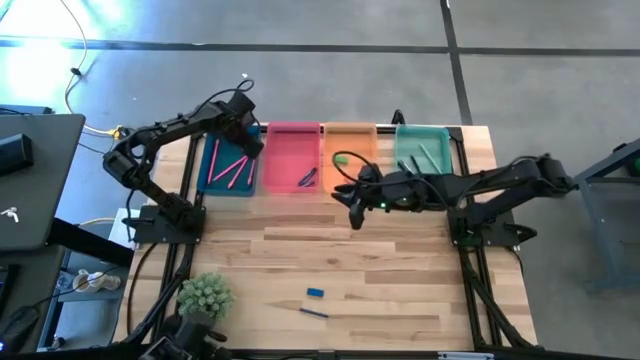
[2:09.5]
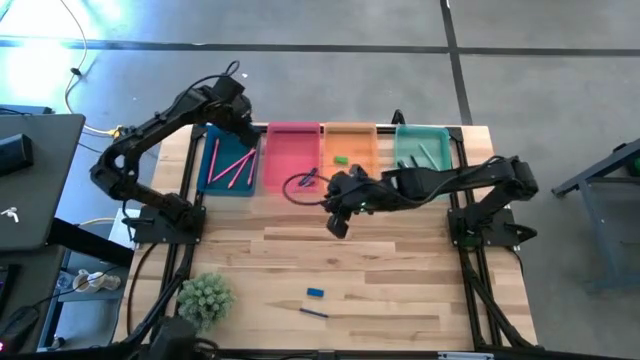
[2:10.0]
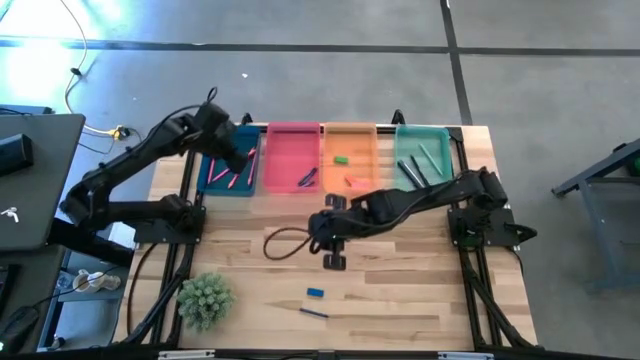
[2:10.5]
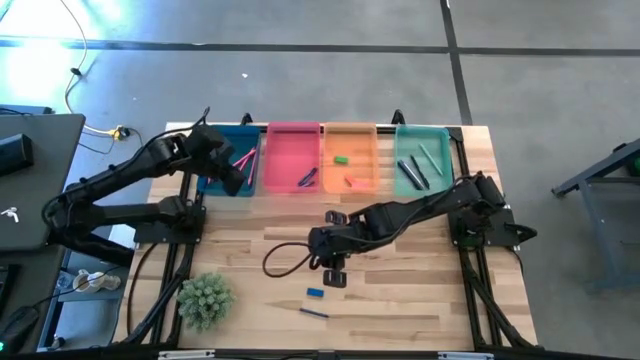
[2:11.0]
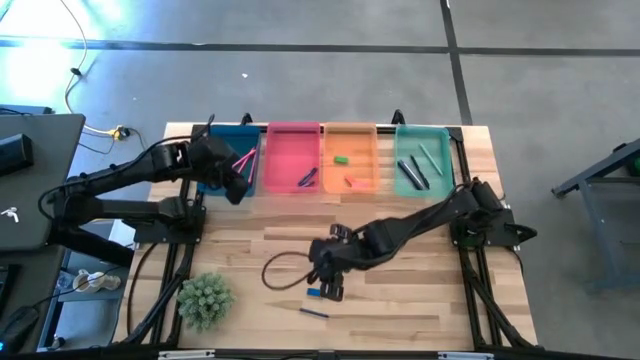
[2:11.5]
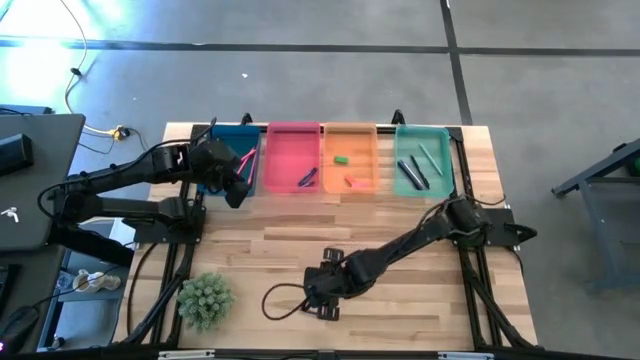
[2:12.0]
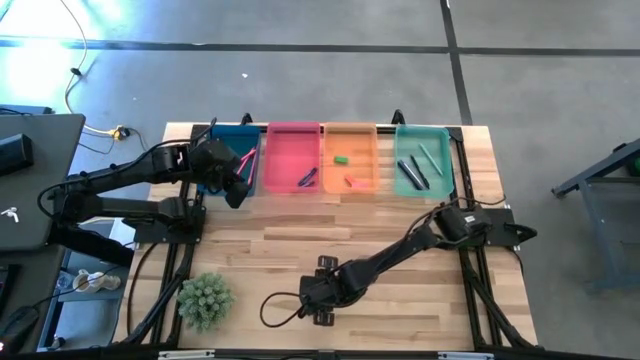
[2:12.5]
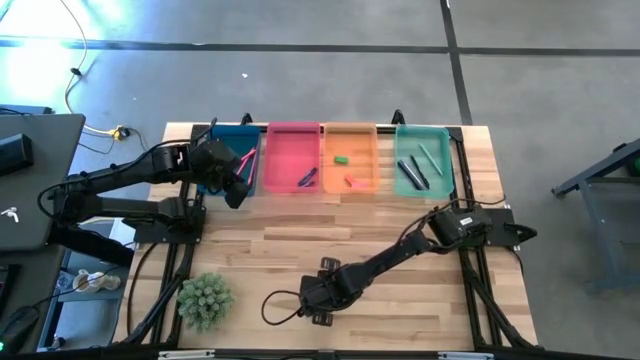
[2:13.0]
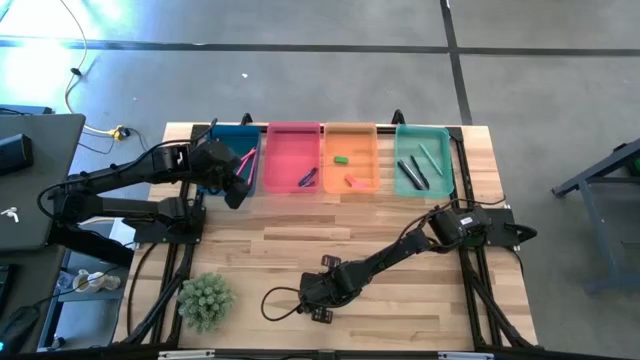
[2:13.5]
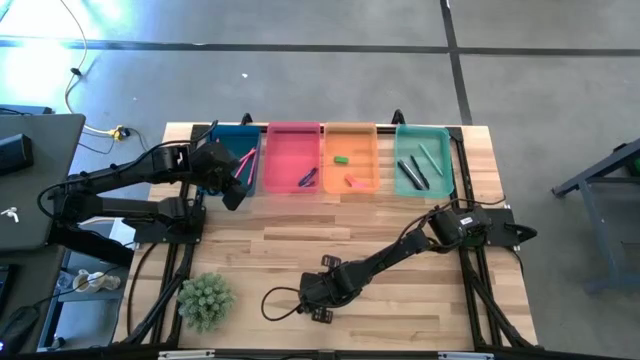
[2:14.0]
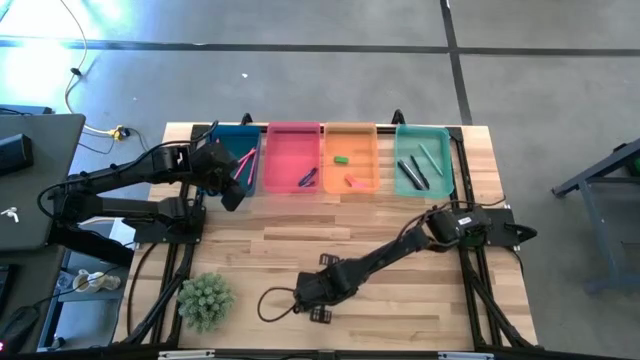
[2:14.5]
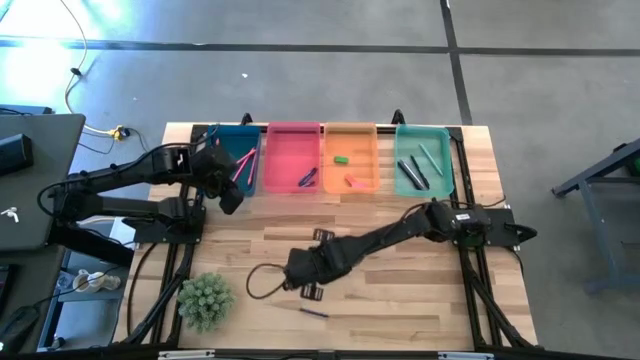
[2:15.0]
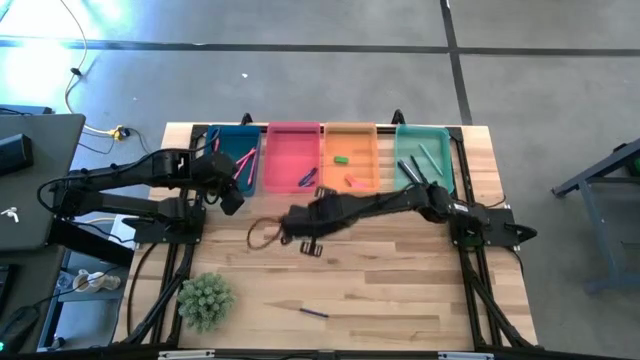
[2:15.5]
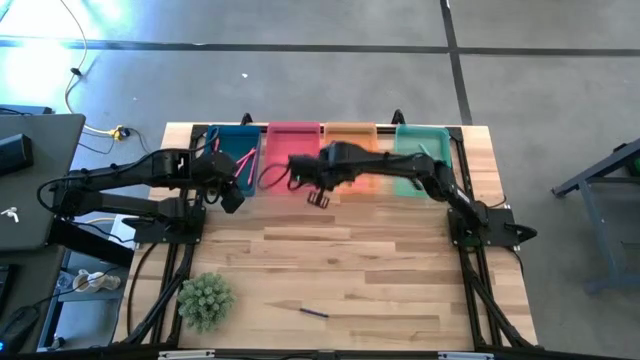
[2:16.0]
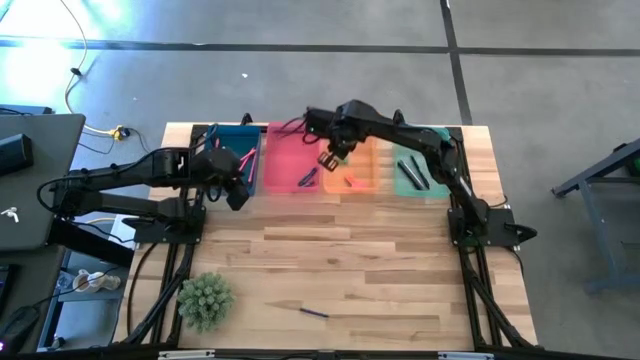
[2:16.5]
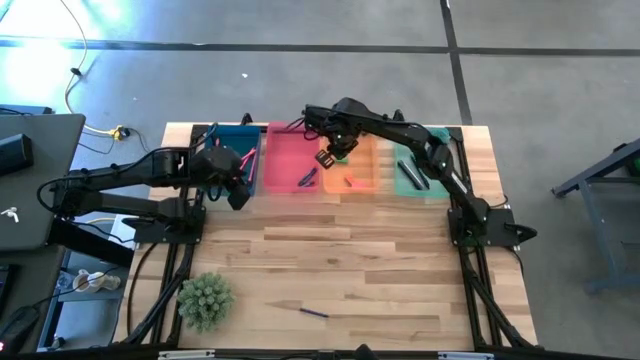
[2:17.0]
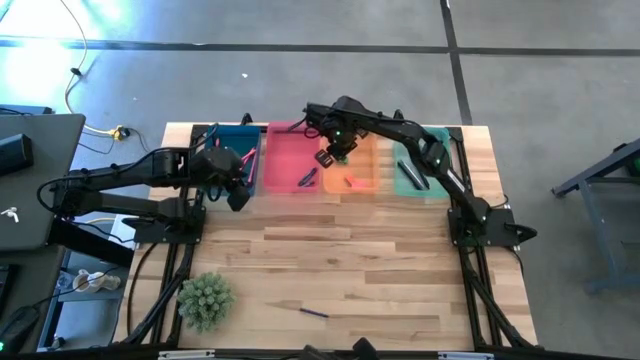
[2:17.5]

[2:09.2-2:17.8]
Task: Sort crayons/erasers/pens/pencils in bins
Put the blue eraser into the orange bin

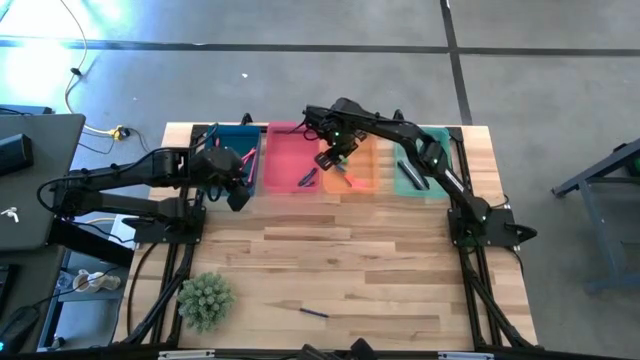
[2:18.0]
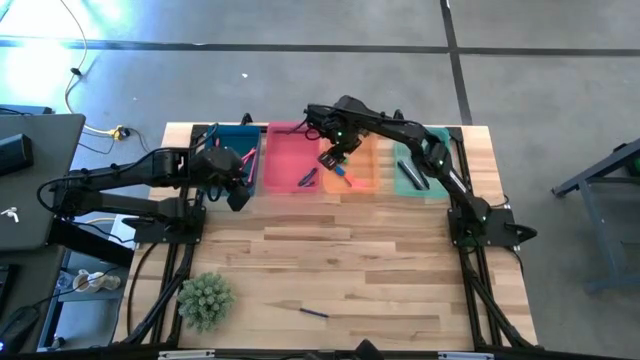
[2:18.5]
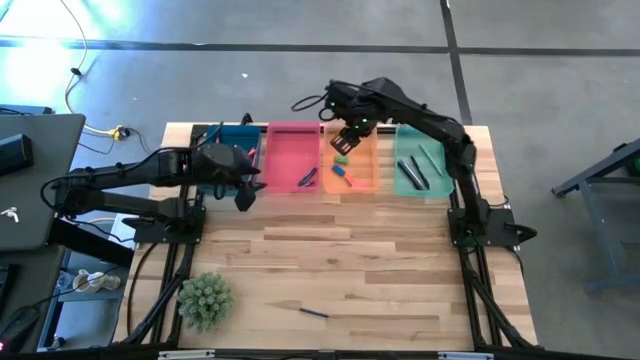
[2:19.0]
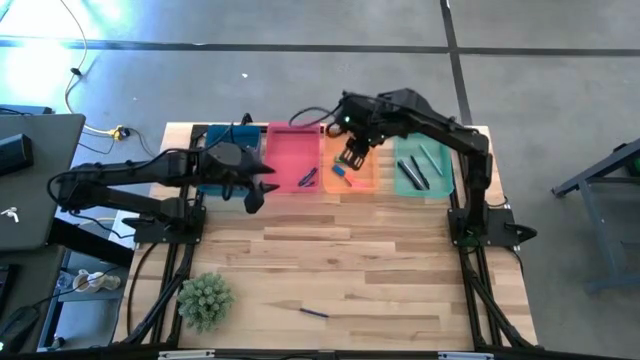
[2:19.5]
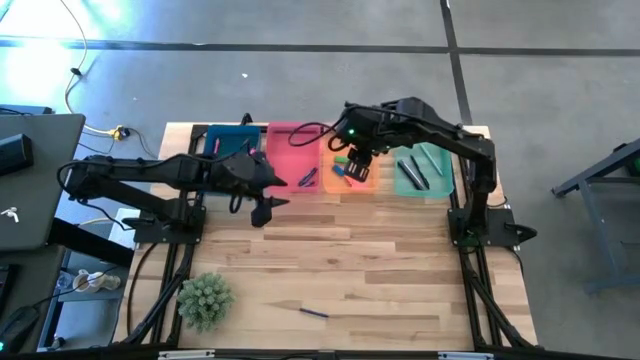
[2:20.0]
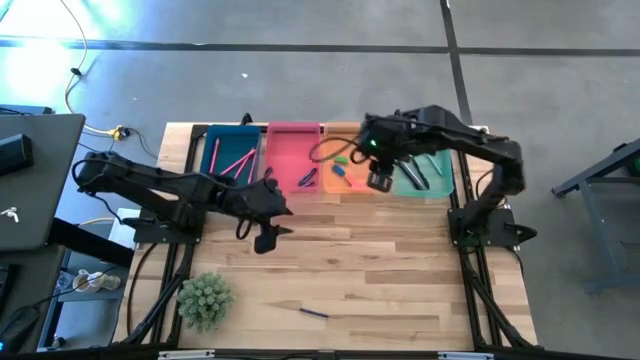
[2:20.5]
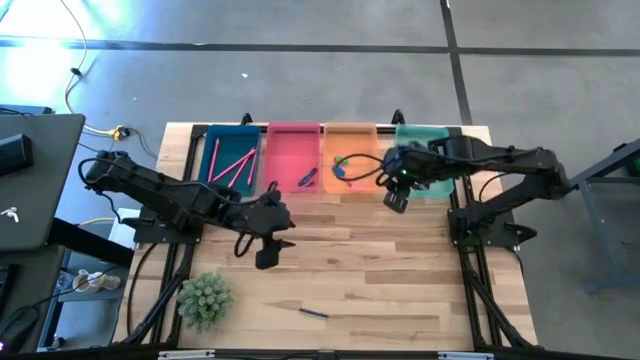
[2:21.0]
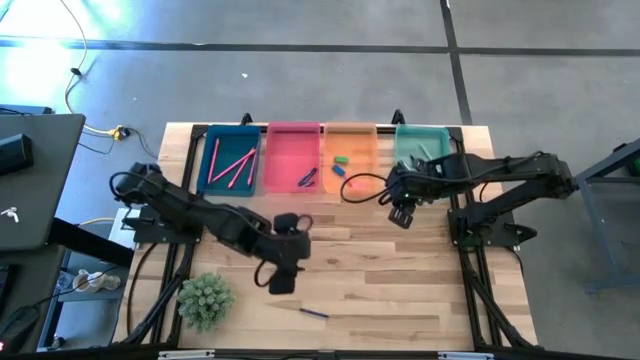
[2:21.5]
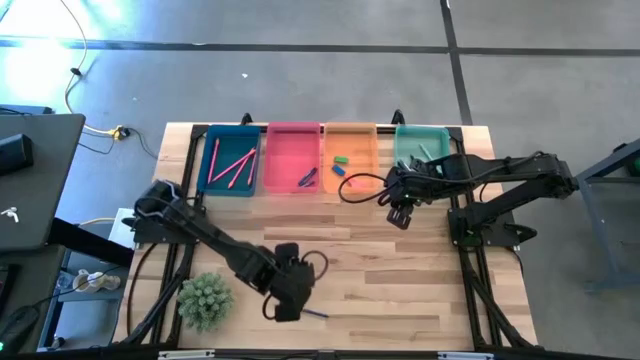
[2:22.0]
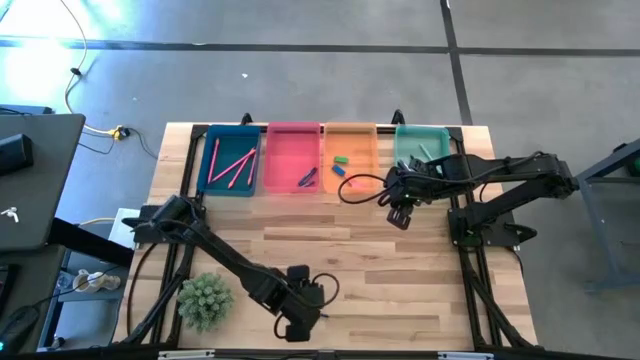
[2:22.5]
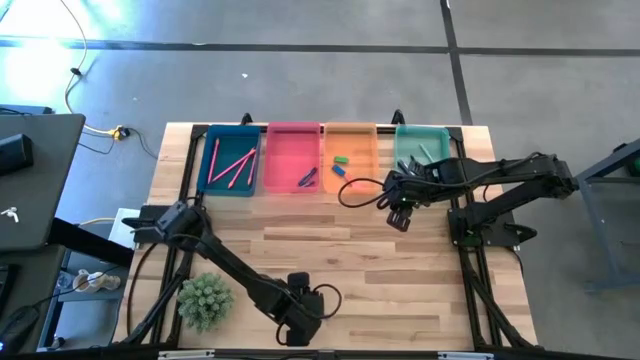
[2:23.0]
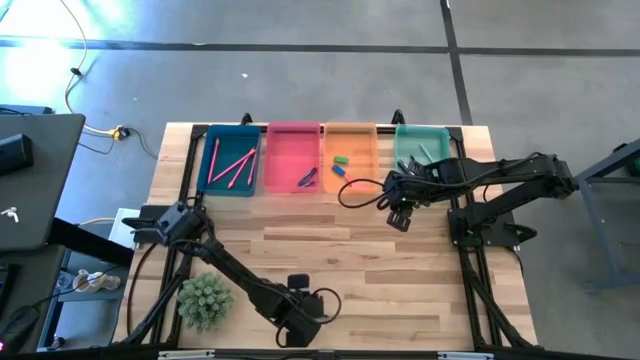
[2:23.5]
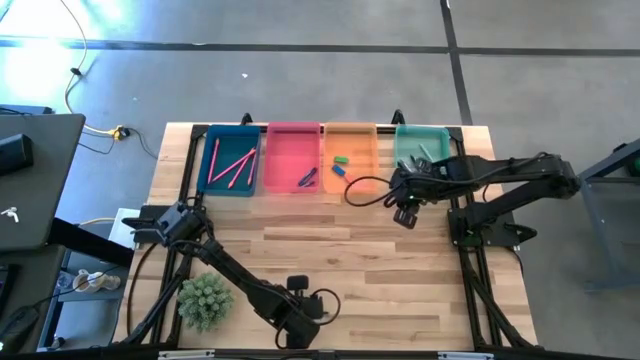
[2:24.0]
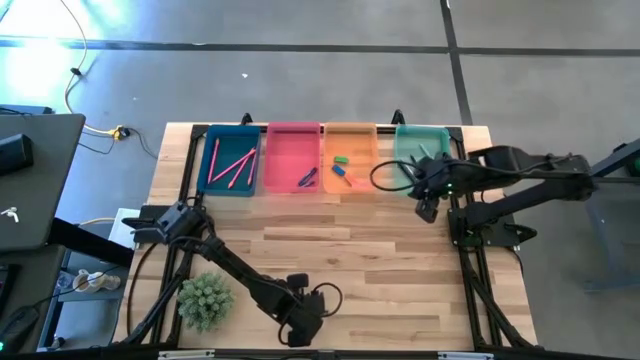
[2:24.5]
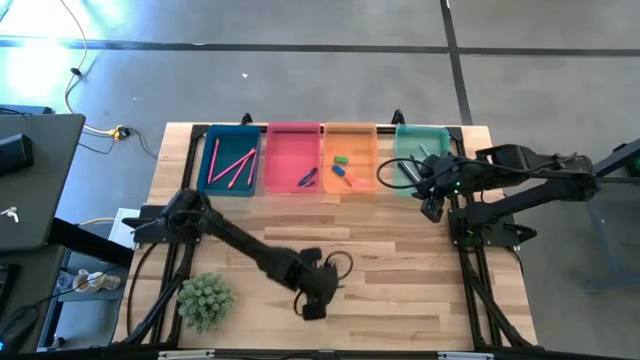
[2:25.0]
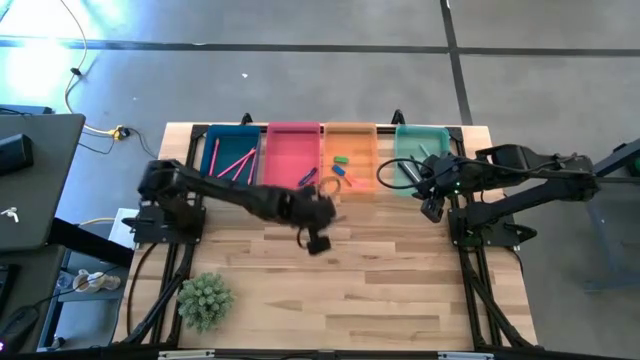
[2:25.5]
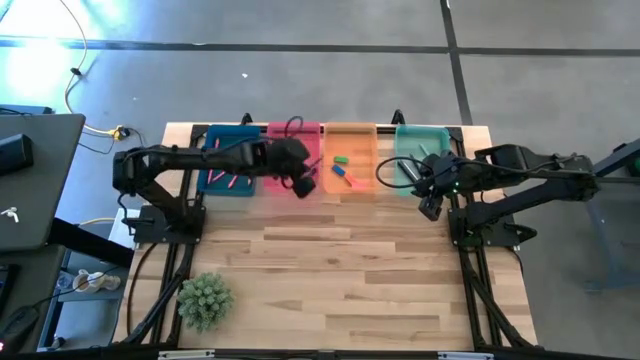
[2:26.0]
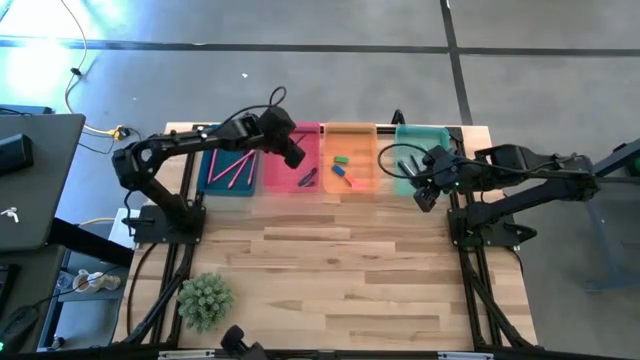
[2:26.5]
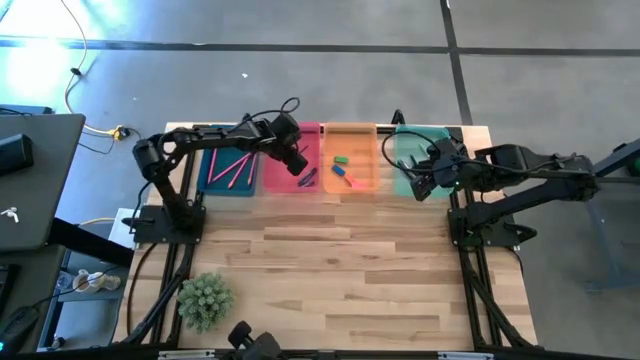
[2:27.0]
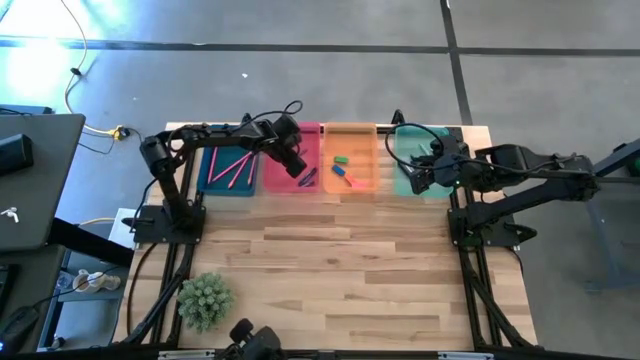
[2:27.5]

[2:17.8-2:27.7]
Put the blue crayon into the pink bin

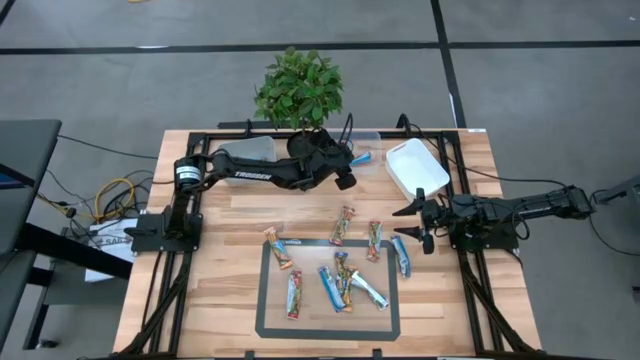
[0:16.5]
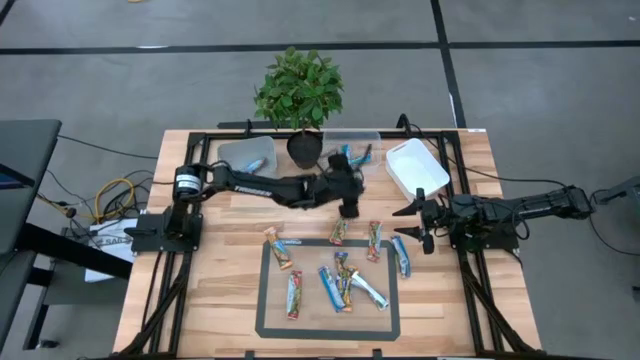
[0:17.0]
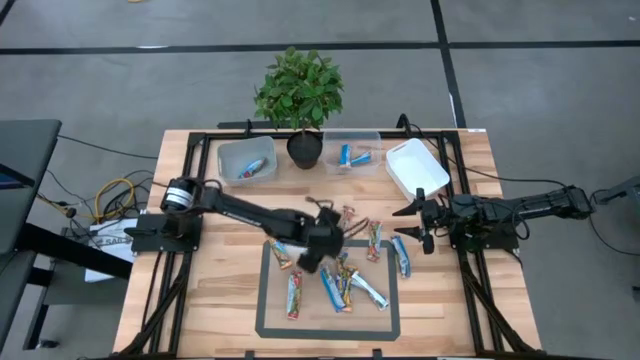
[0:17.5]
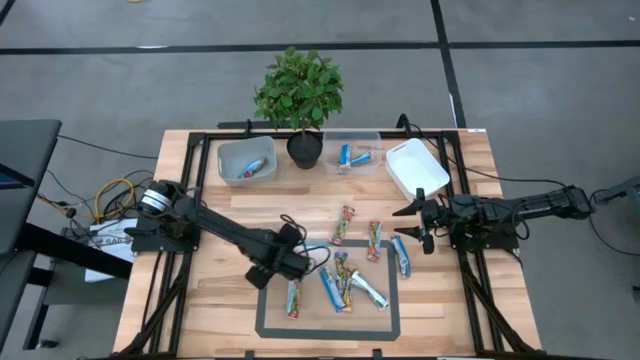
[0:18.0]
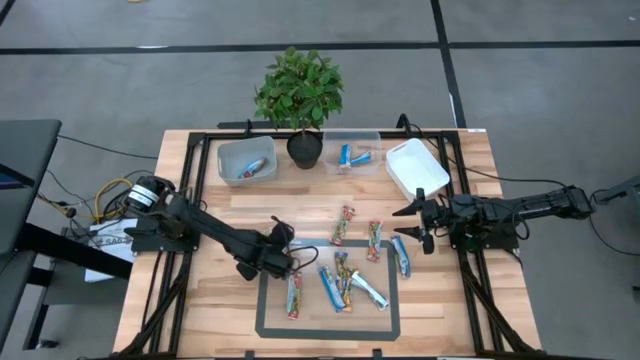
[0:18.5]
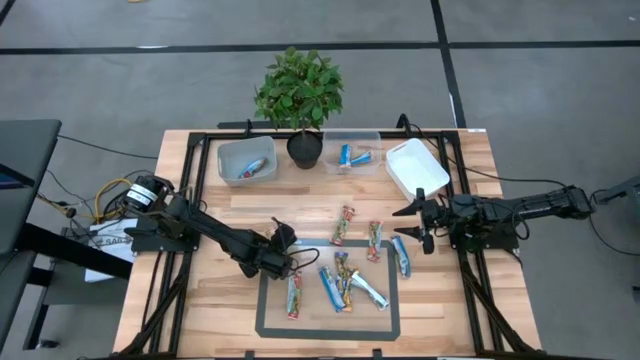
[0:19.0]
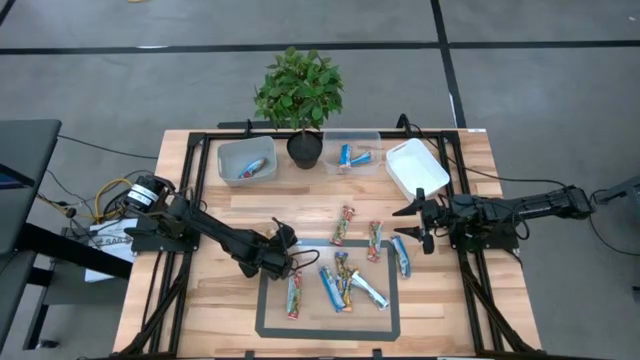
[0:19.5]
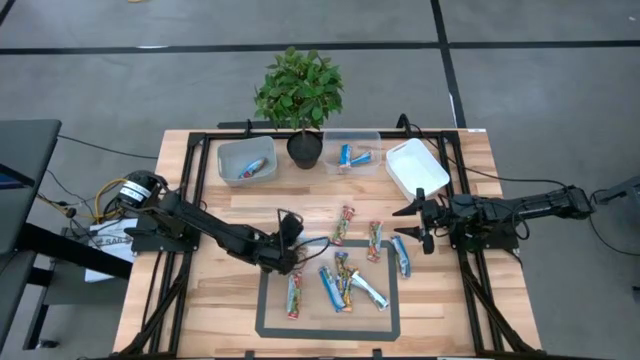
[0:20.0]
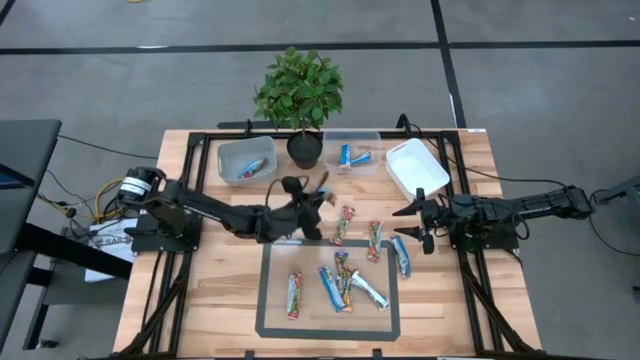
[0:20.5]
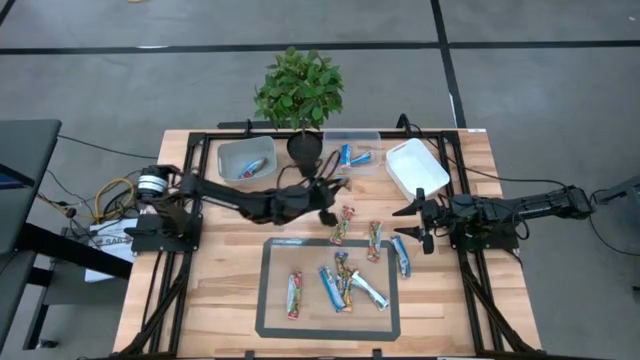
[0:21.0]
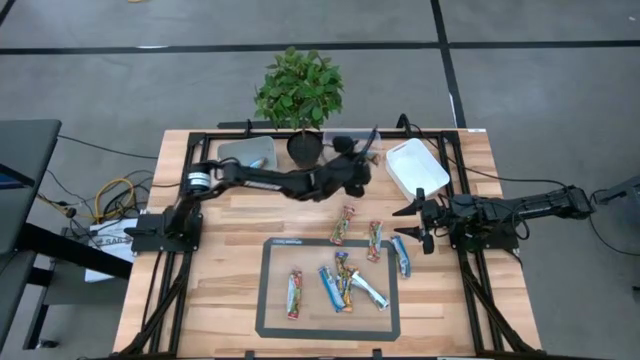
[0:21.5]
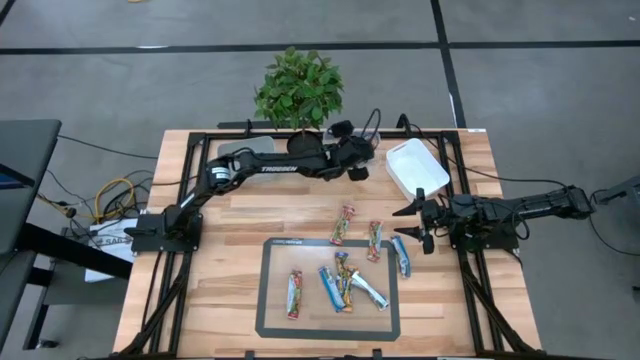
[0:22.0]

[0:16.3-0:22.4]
Task: Pick and place Granola Bars by type
Put the yellow granola bar into the transparent bin
